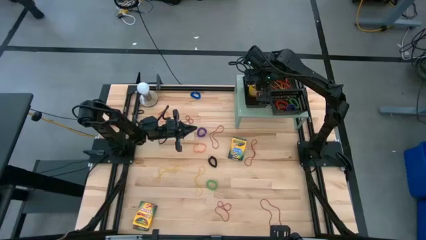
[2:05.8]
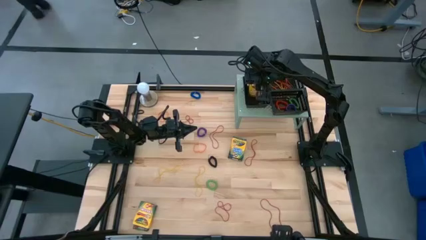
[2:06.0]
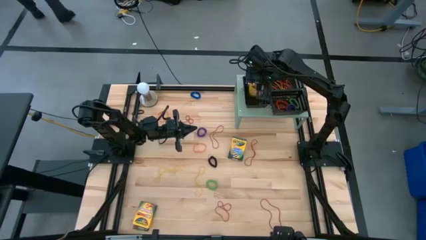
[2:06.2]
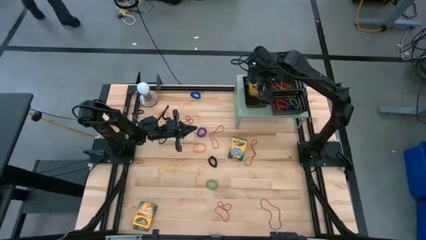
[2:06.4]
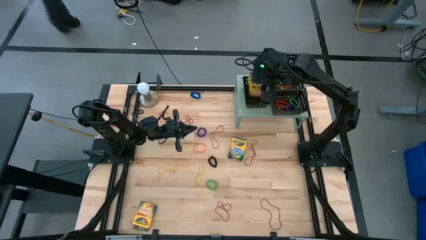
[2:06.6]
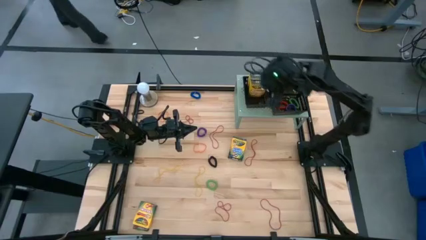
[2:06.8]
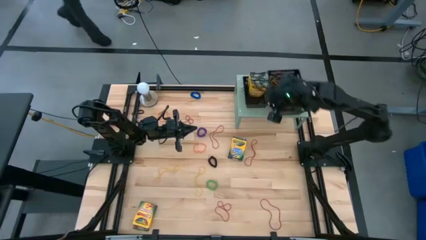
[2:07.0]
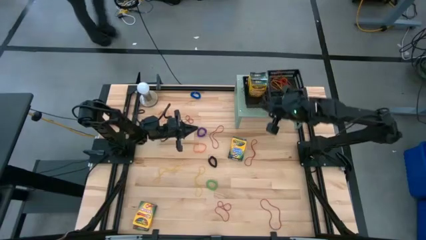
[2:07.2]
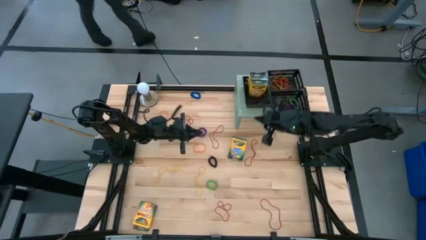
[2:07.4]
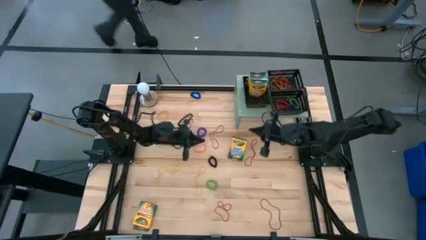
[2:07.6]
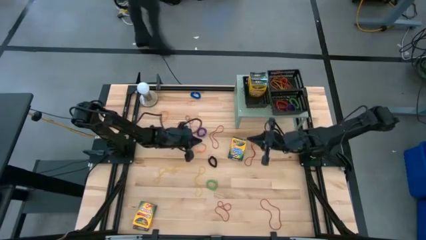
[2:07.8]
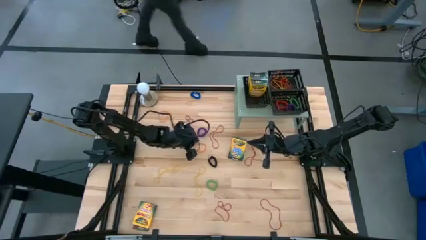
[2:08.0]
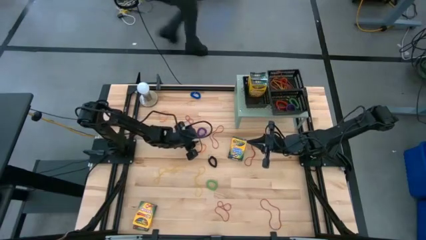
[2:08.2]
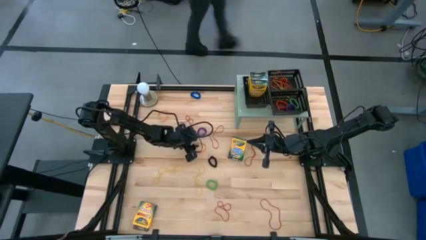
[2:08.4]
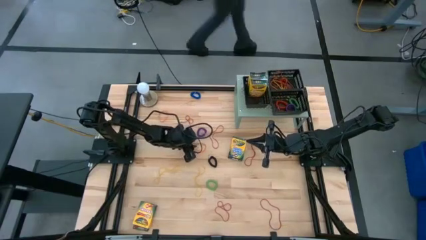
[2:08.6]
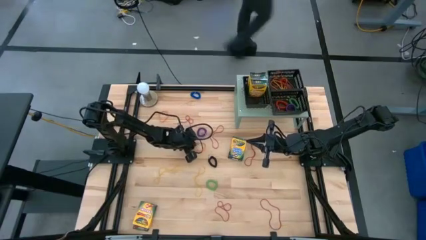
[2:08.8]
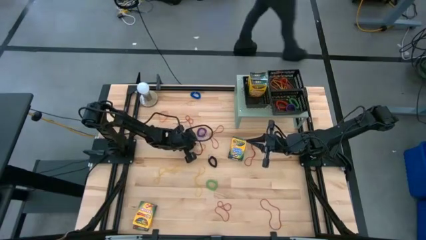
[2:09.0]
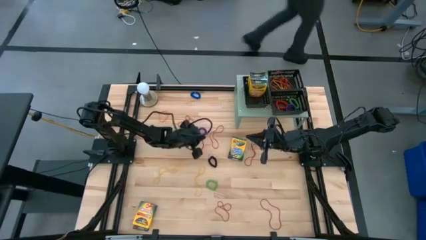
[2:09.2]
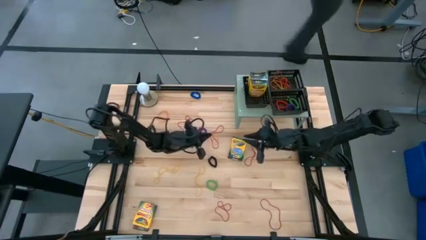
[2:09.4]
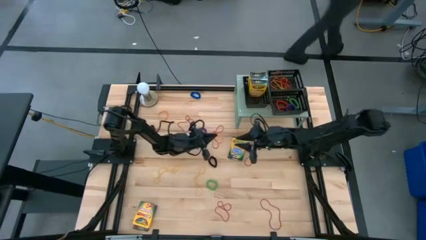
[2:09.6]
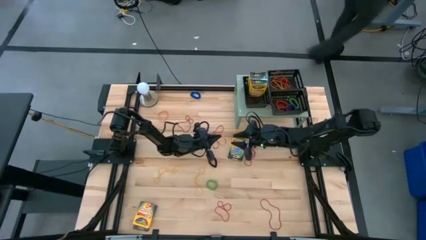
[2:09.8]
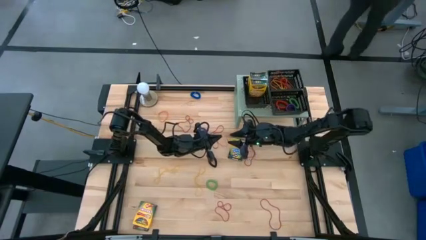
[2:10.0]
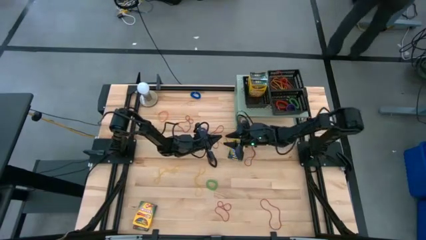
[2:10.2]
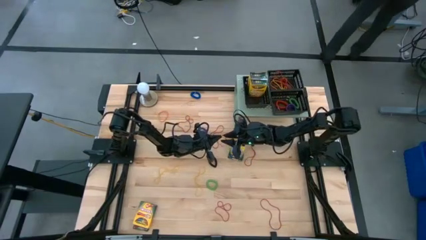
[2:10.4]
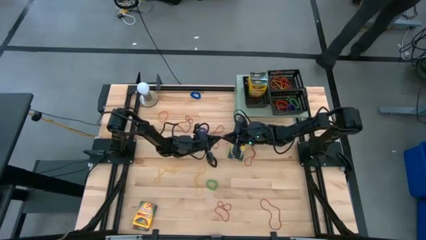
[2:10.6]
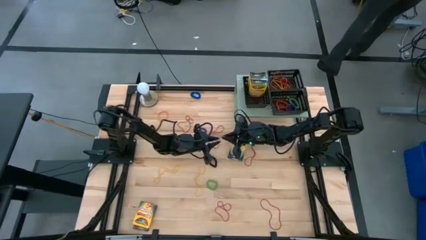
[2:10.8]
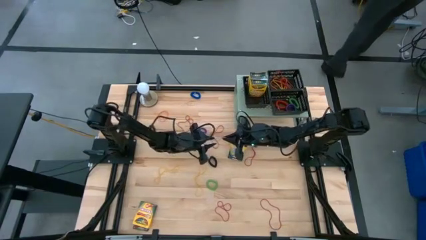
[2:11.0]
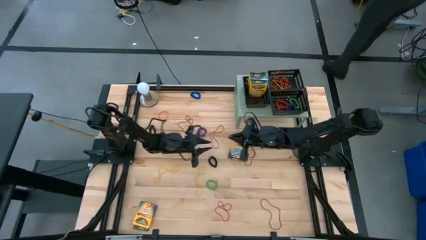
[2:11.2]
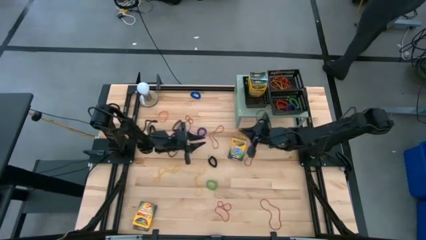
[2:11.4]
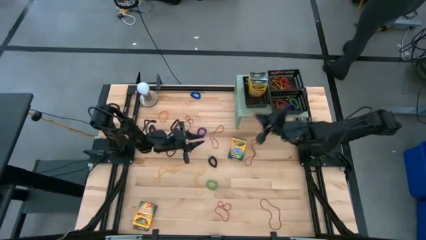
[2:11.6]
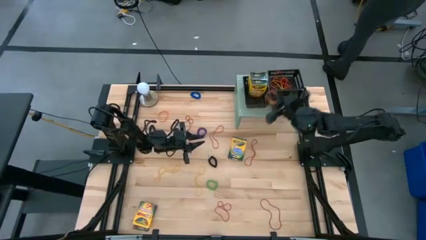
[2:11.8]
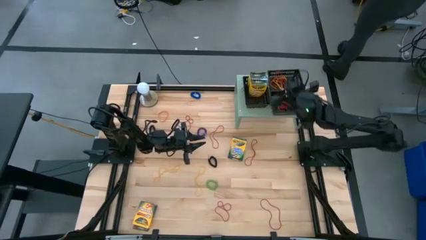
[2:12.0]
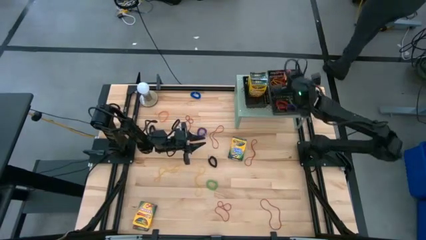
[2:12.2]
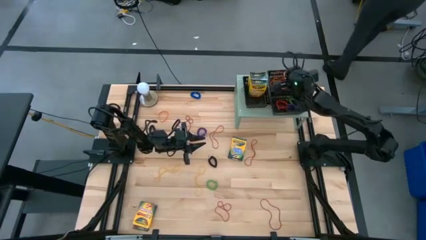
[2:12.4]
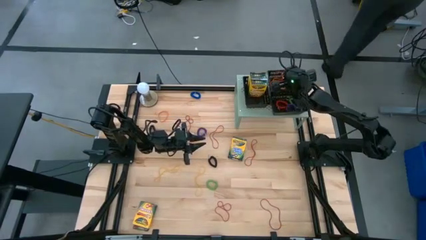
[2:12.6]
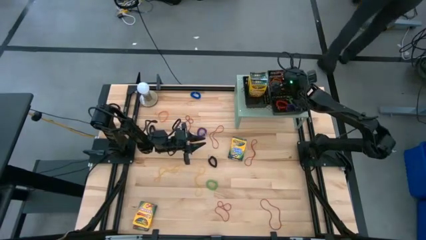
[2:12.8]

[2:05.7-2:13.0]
Task: Pick & Place Office Desk Supplies
Put the orange rubber band into the bottom right black bin on the shelf

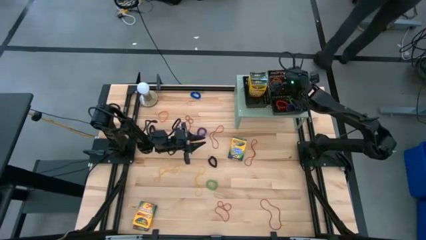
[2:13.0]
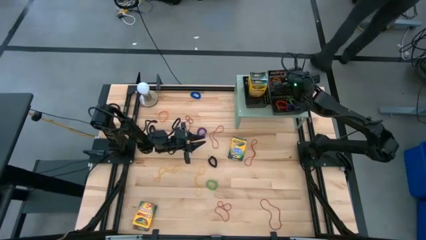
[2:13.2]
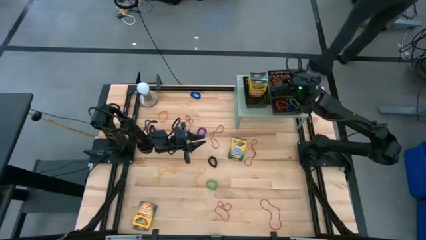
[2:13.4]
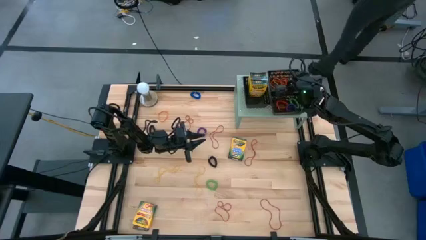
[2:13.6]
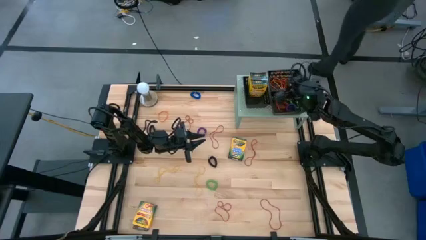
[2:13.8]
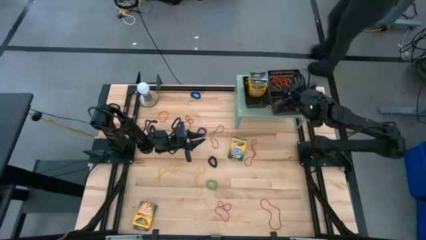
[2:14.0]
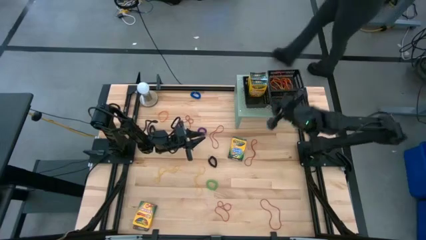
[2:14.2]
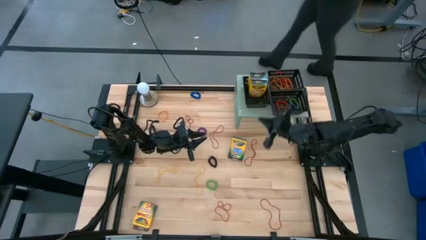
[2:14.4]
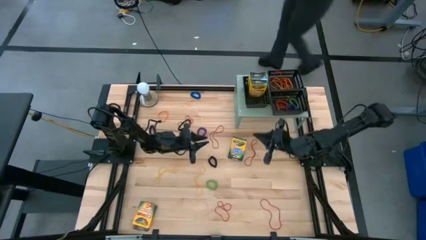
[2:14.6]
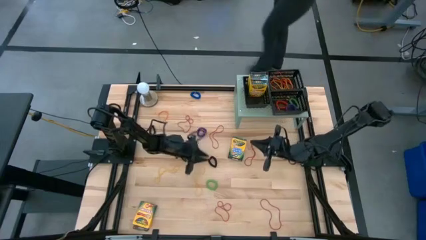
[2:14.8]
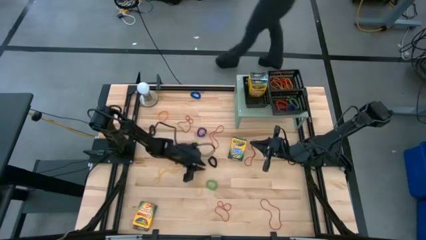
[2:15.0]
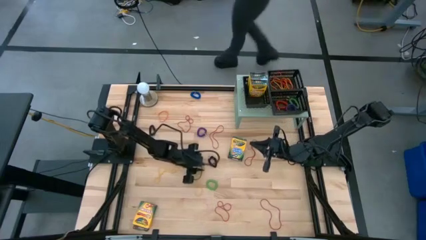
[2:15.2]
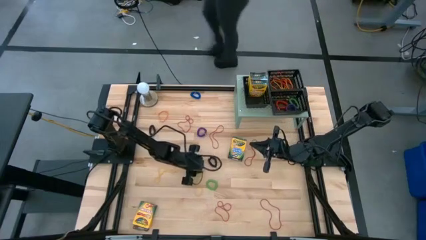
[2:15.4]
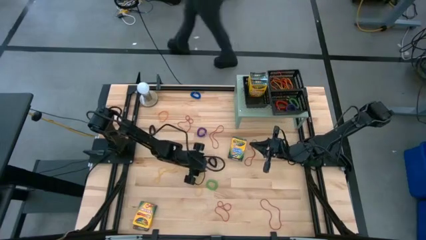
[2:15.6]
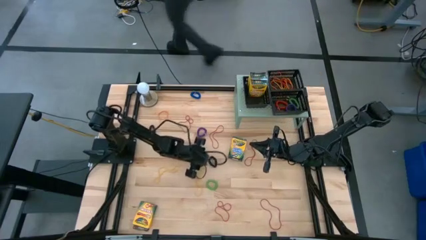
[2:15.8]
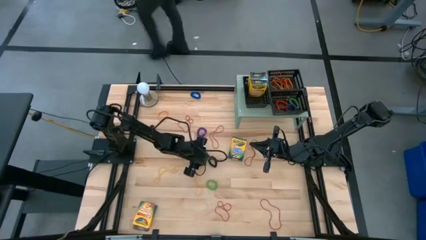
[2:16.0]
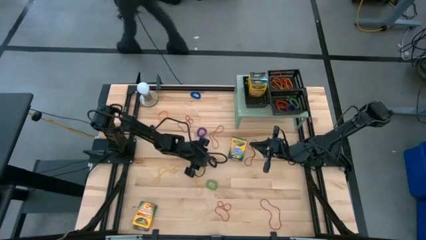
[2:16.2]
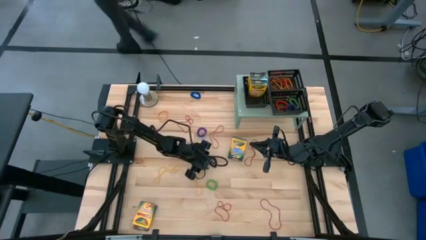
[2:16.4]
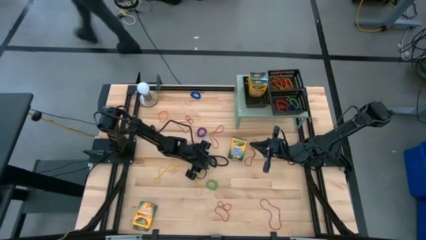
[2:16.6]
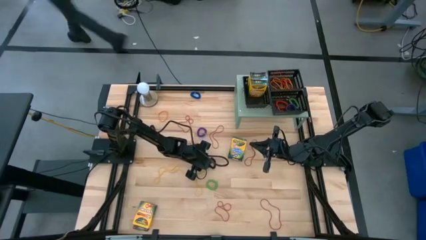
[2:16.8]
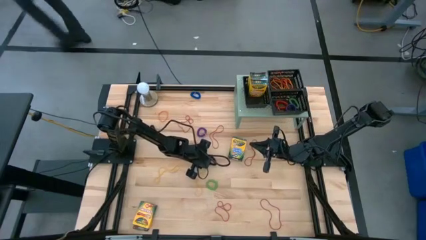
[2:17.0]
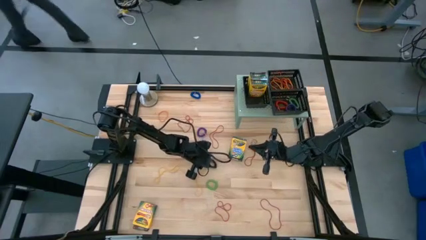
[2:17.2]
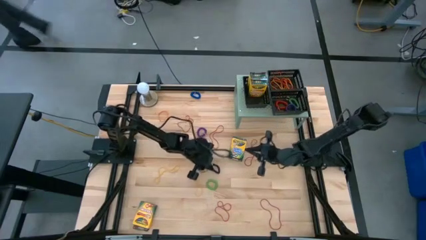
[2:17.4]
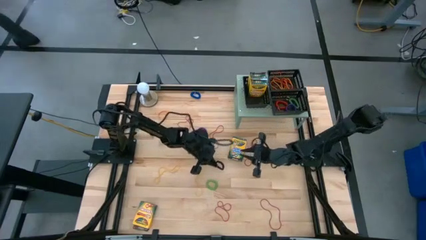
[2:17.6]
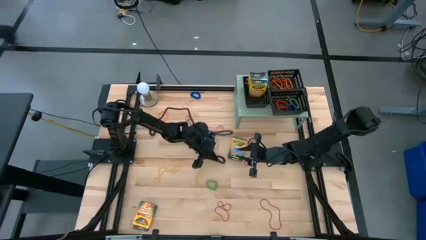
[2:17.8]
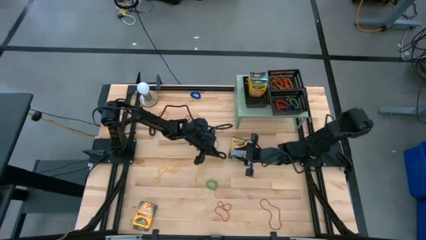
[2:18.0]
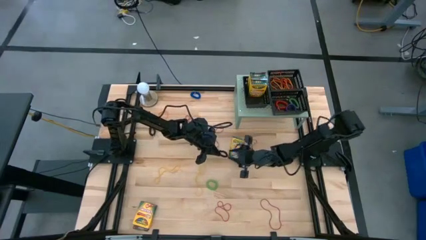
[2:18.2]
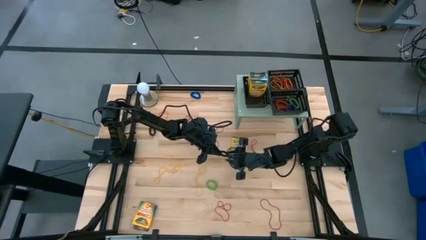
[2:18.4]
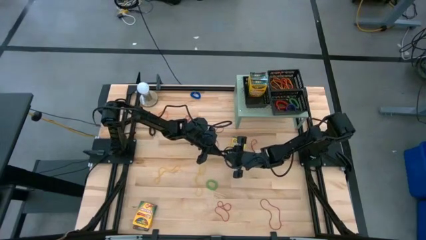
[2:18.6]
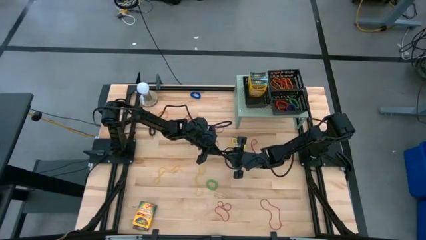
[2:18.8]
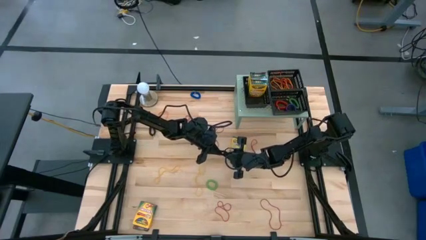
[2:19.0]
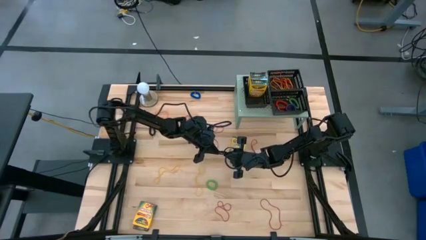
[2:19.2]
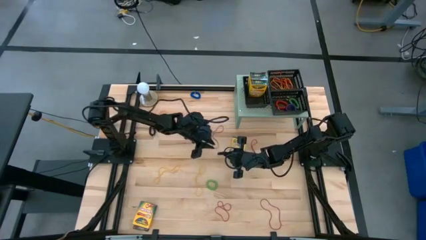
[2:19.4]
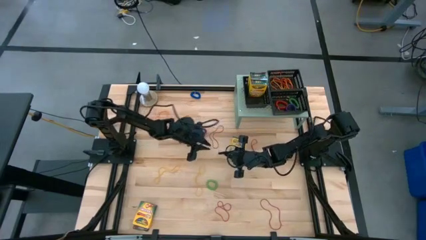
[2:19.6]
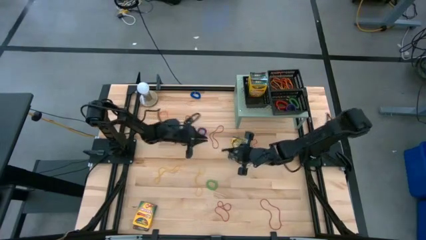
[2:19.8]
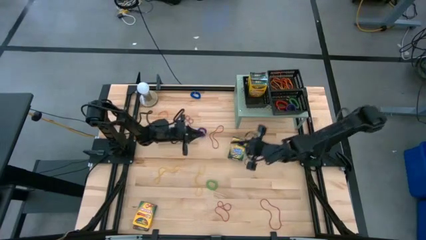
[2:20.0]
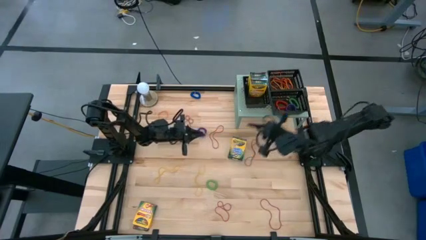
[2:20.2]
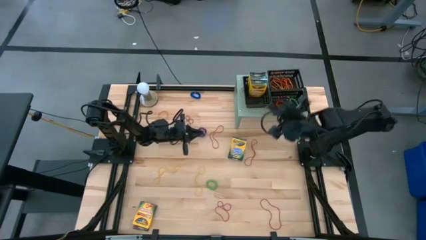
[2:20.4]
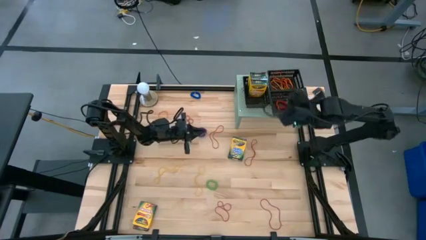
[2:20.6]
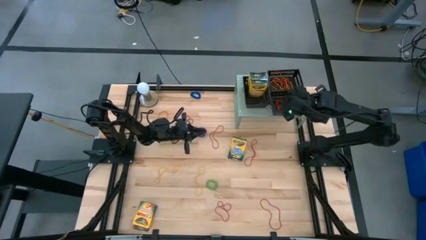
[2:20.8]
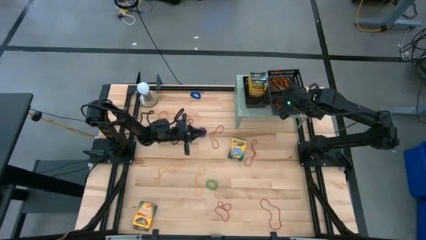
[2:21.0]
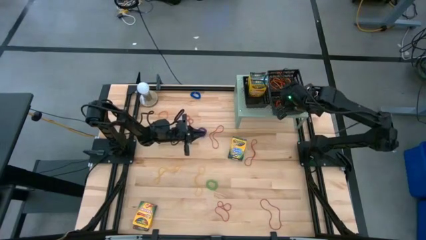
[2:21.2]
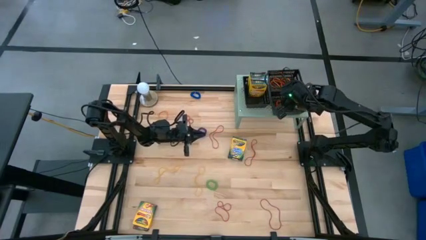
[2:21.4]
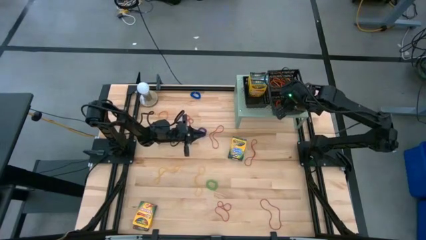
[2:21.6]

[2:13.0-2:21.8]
Put the black spring keychain into the bottom right black bin on the shelf

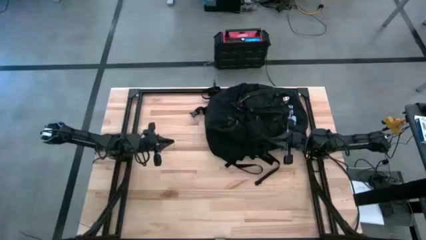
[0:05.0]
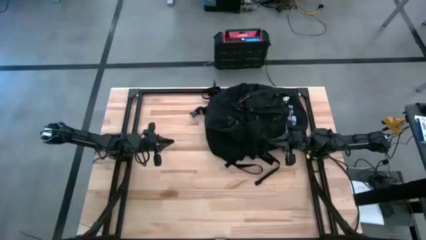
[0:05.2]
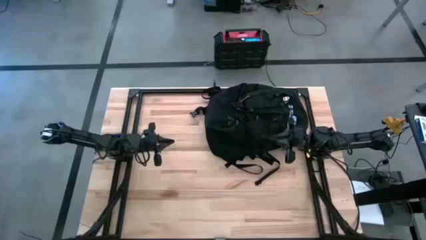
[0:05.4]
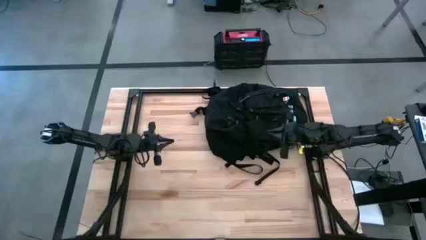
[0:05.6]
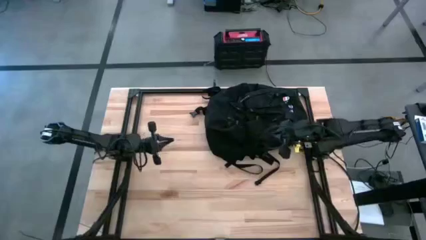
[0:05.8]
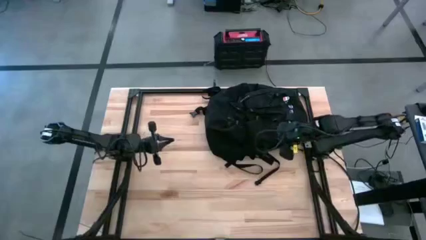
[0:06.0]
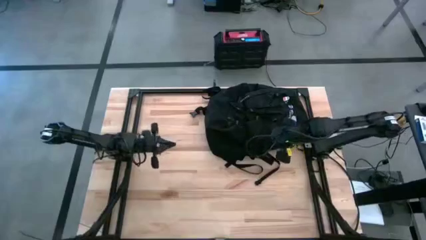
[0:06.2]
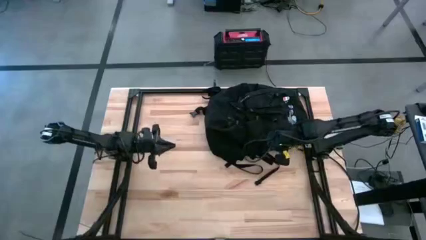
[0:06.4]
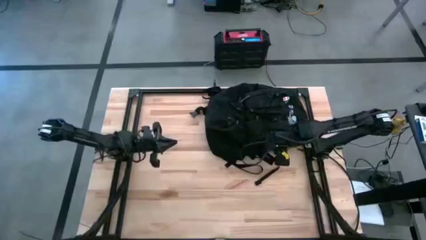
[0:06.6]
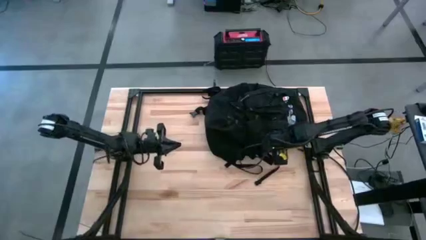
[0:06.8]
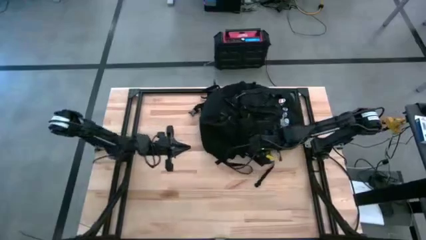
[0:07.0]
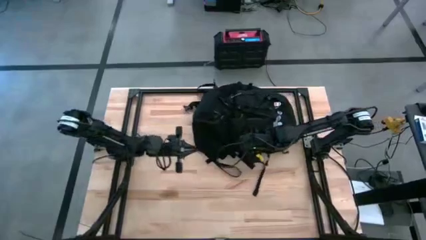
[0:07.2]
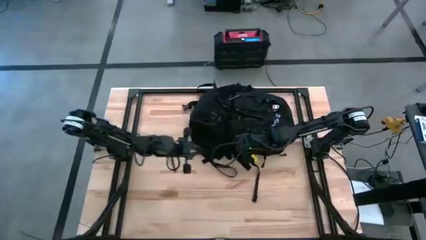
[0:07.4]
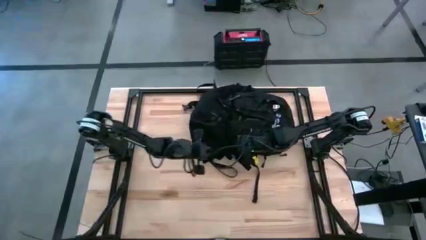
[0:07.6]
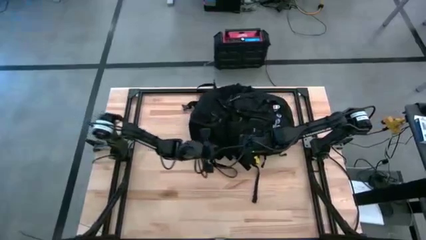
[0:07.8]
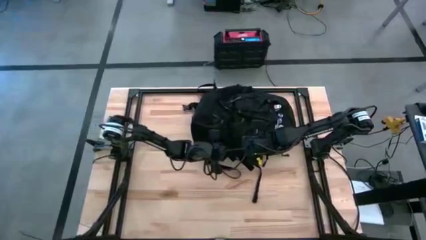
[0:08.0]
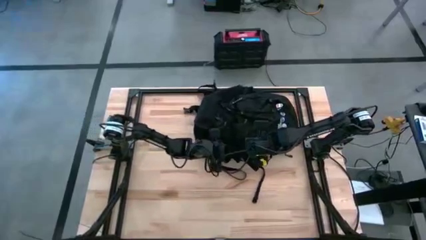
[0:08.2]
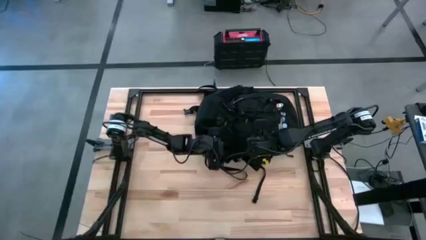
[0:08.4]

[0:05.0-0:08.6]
Task: Unpack backpack
Open the black backpack
